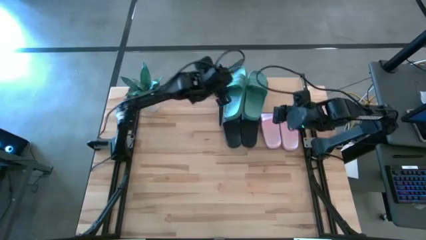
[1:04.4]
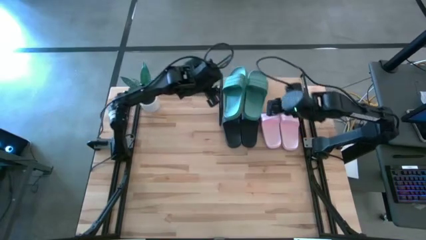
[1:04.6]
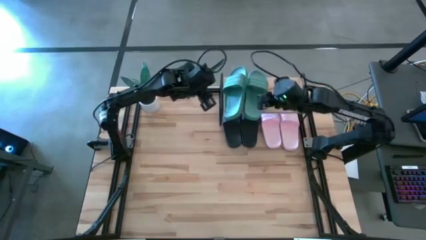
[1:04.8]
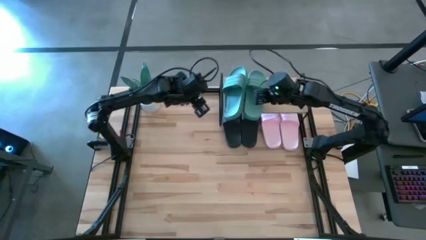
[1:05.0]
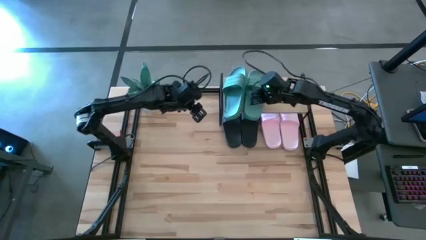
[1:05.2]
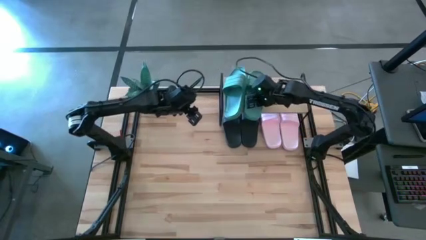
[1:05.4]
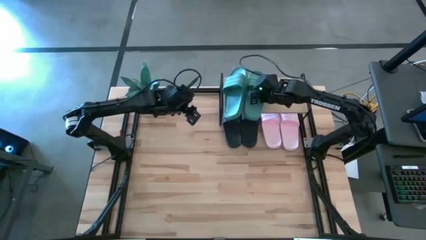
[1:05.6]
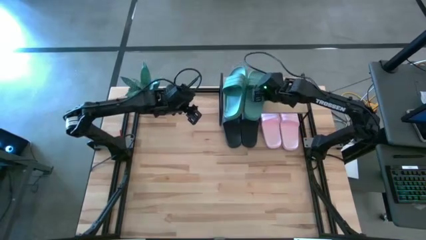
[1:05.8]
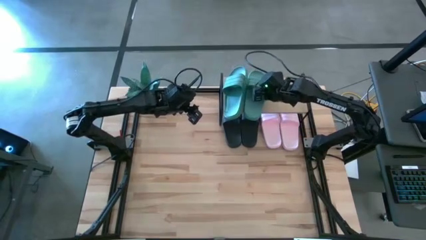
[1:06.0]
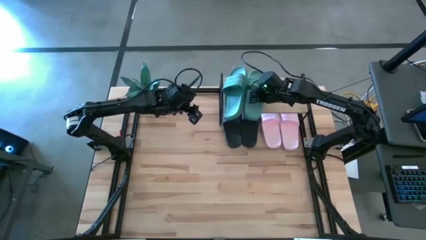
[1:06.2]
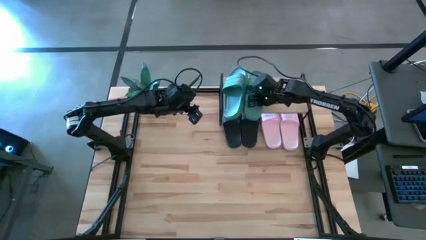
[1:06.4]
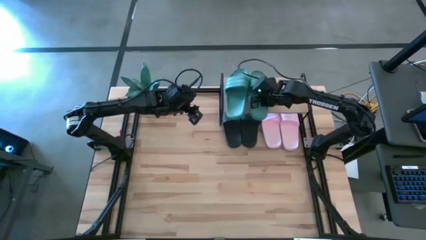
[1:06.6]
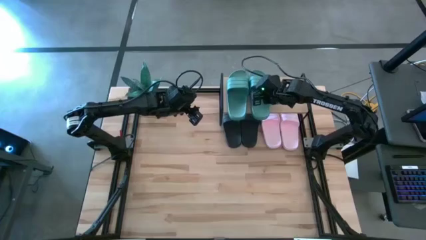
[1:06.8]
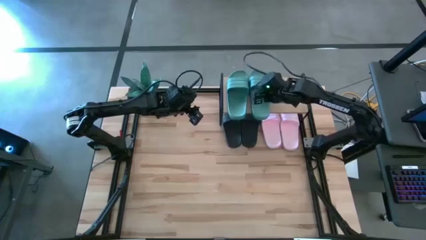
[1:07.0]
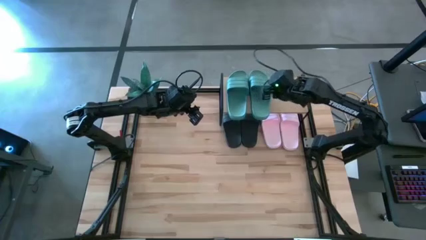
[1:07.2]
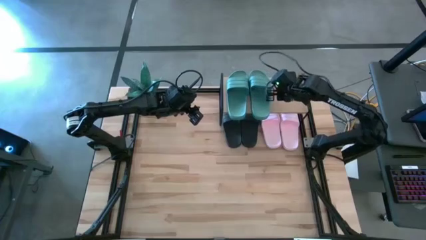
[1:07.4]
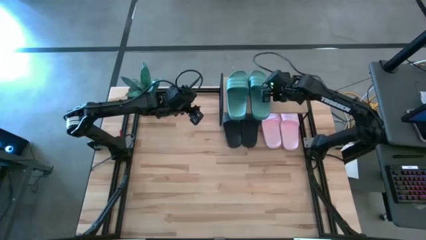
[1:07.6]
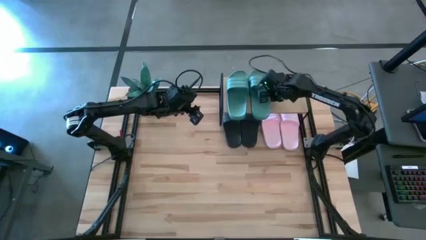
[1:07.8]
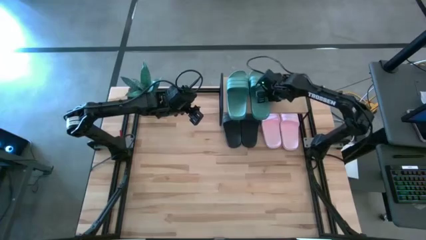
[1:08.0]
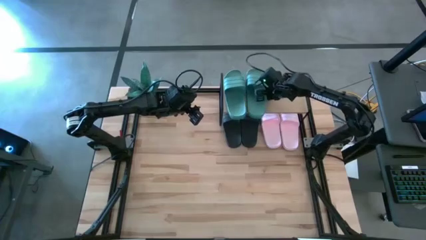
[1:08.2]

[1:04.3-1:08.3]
Task: Pick and place slides into the shelf
Adjust the right green slide on the shelf

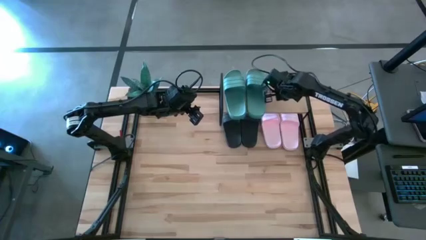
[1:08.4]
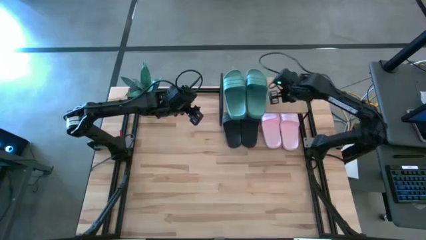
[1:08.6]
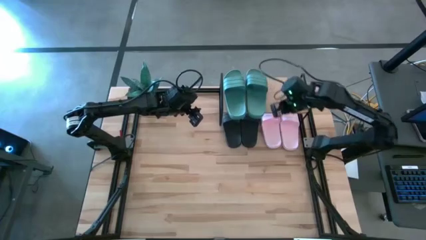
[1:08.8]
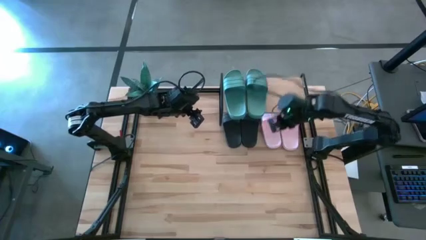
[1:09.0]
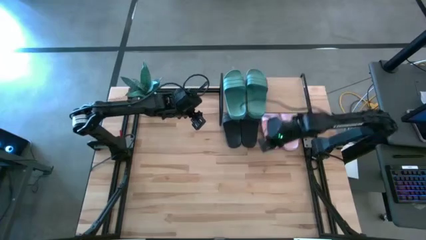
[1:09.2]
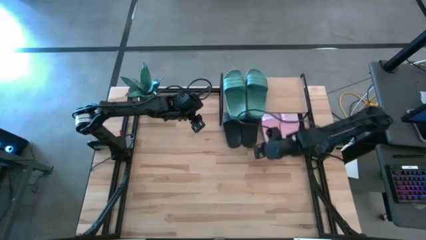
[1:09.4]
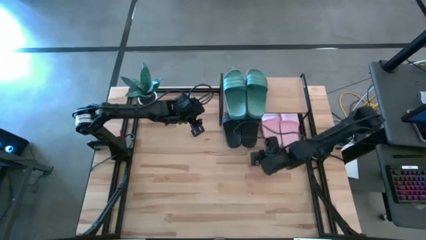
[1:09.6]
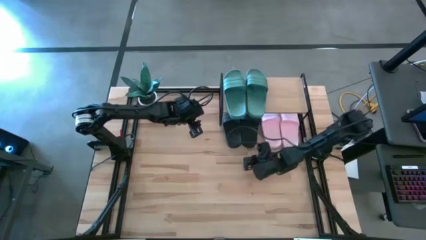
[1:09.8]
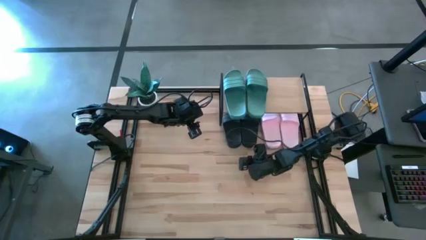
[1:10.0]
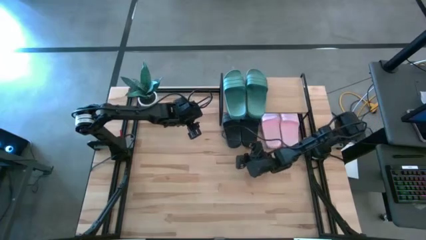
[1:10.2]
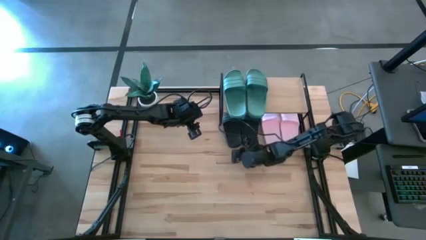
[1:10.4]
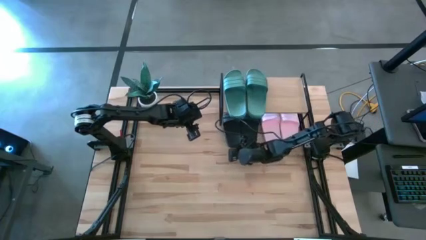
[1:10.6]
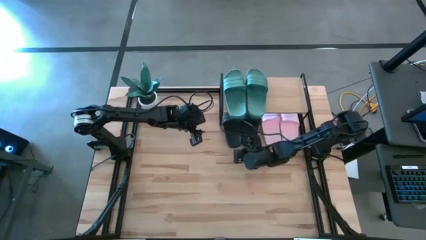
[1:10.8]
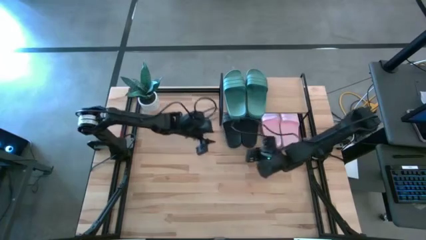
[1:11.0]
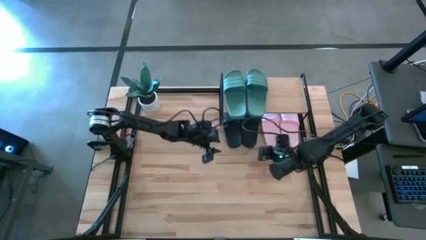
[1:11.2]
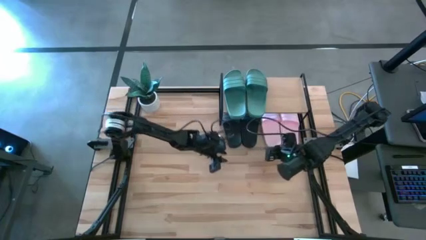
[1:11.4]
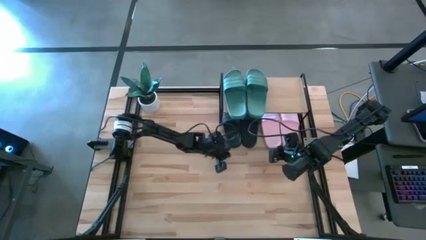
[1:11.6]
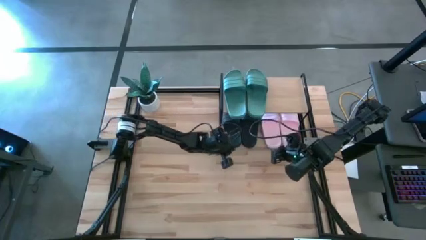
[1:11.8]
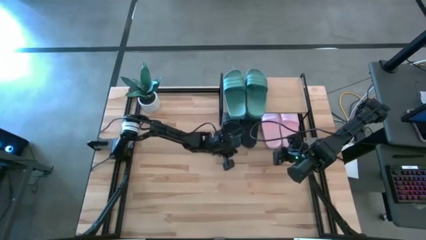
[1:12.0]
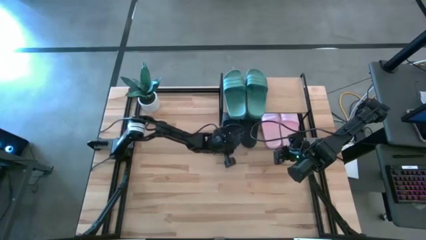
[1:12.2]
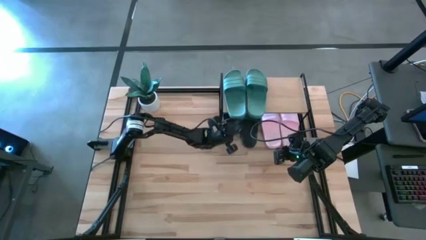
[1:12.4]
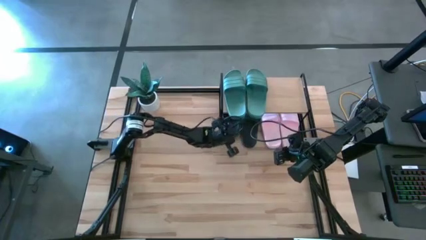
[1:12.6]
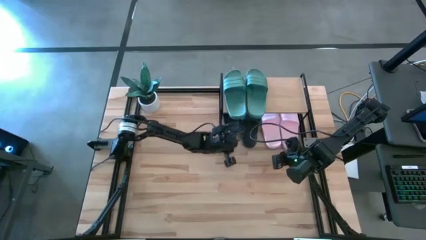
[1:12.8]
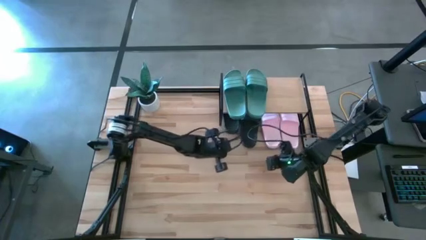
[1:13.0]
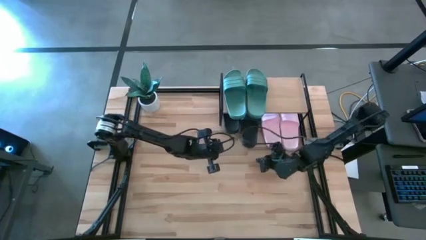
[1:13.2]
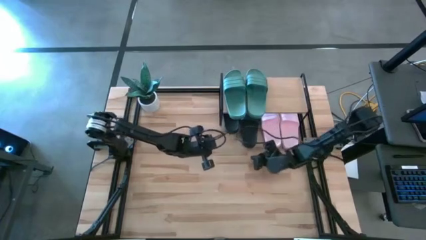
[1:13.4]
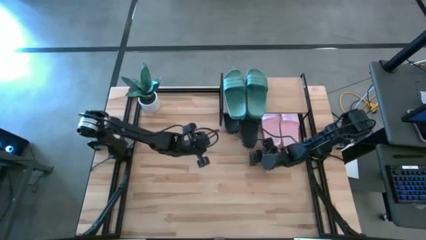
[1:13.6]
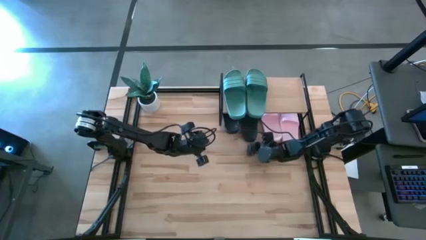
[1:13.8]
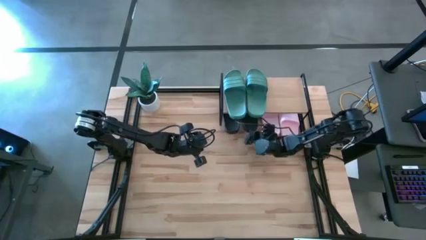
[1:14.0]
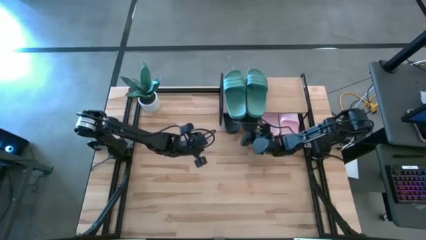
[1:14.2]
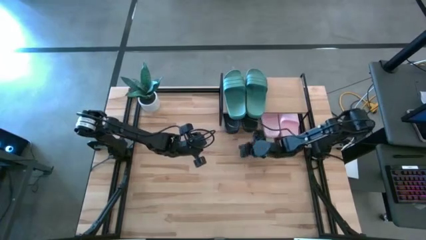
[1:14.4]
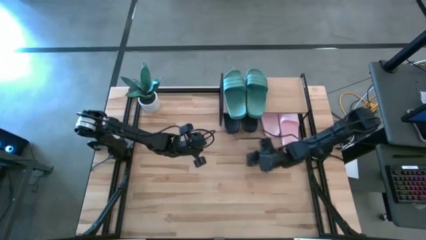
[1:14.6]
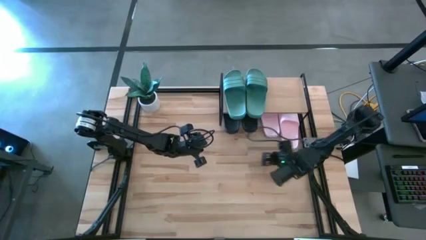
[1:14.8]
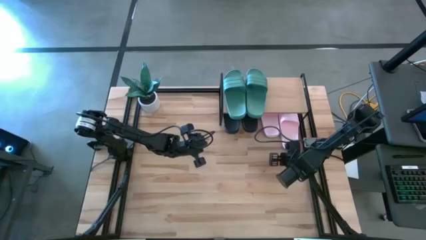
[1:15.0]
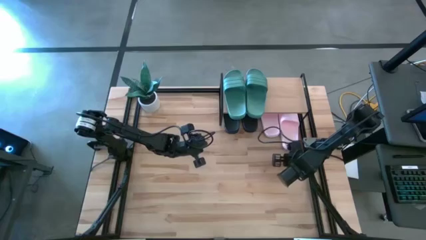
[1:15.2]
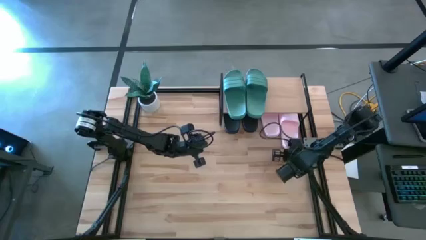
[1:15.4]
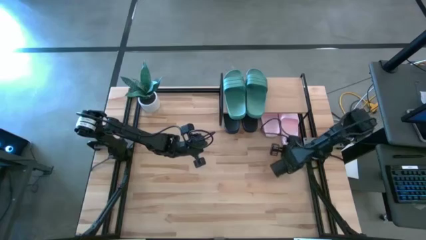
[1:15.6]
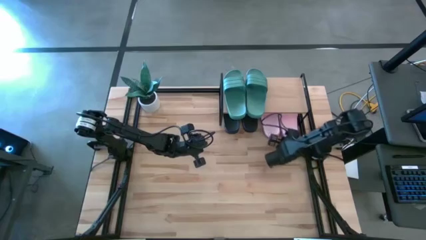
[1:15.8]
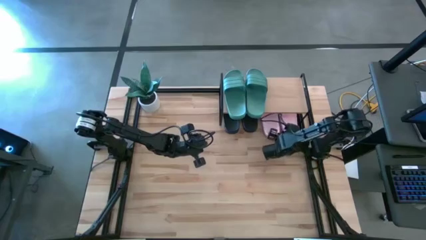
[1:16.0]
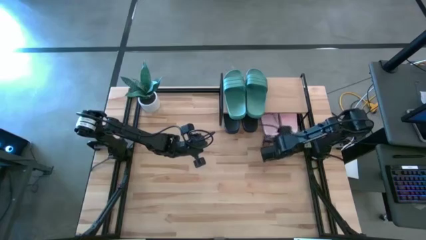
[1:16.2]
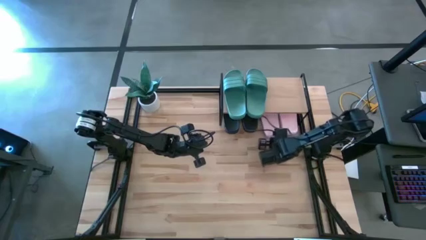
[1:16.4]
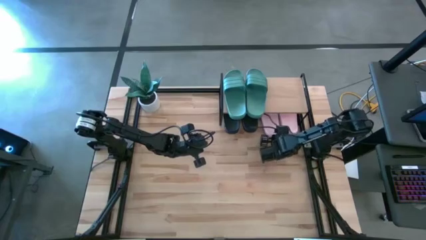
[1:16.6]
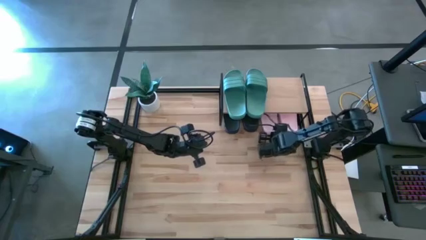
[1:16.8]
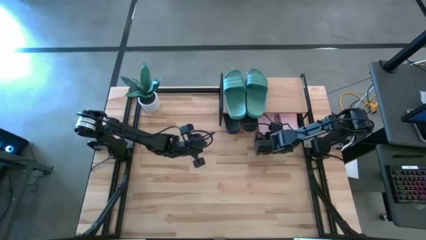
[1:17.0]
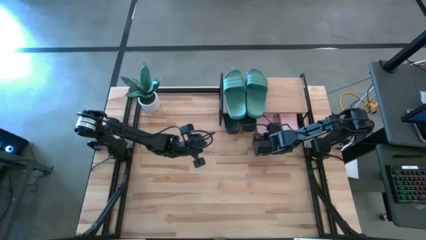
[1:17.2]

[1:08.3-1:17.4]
Adjust the slides under the shelf

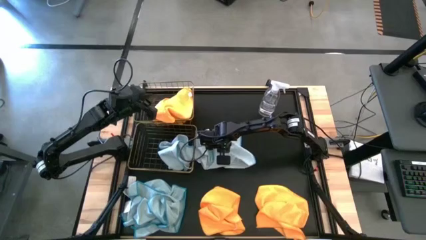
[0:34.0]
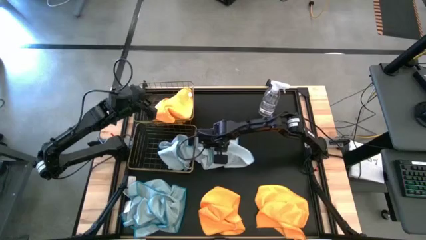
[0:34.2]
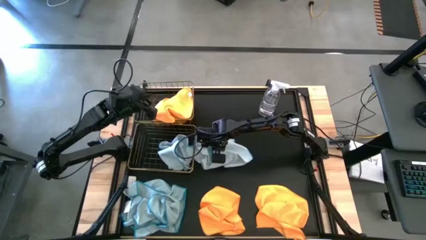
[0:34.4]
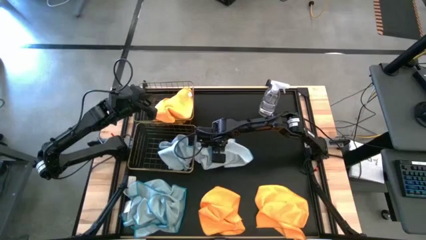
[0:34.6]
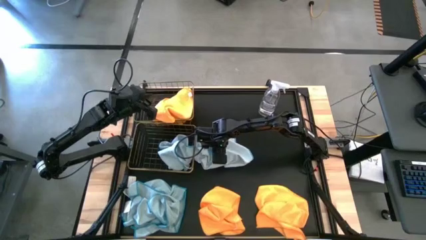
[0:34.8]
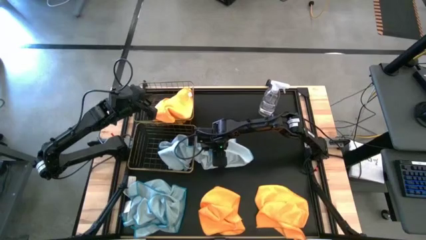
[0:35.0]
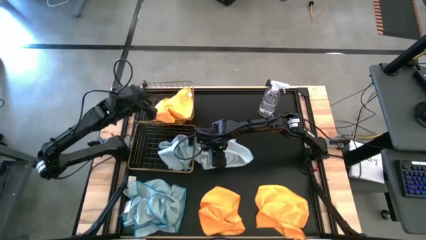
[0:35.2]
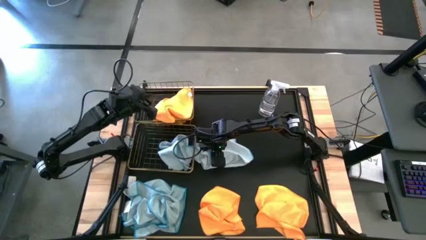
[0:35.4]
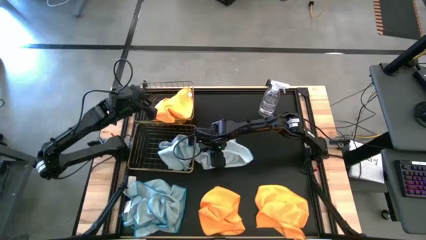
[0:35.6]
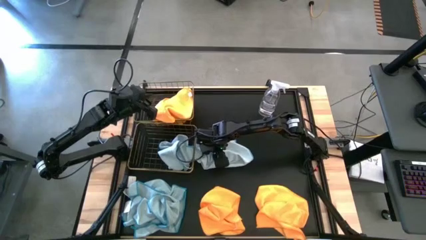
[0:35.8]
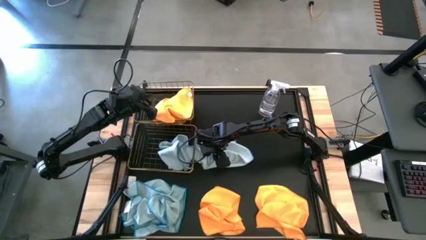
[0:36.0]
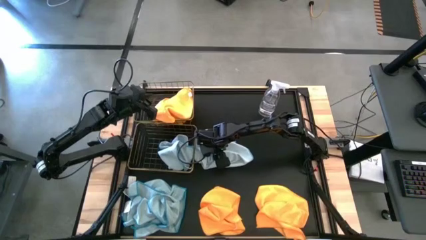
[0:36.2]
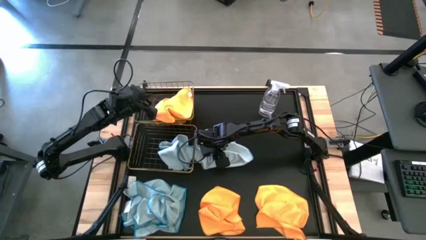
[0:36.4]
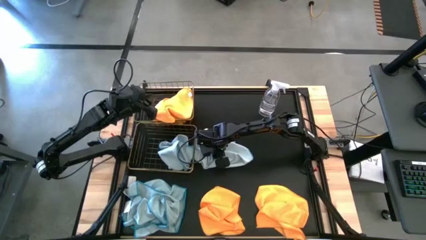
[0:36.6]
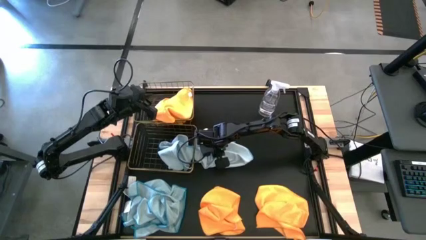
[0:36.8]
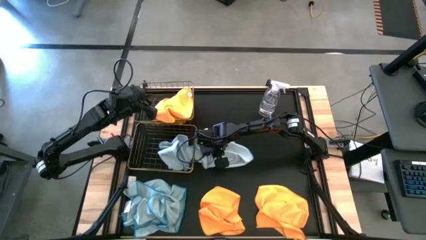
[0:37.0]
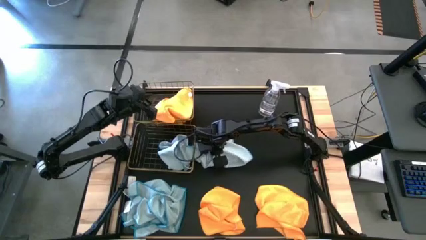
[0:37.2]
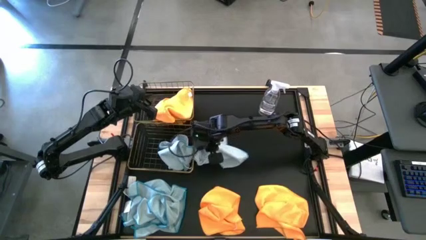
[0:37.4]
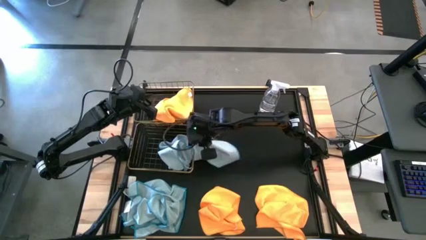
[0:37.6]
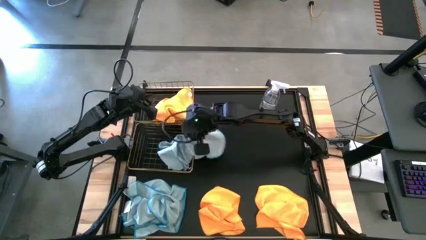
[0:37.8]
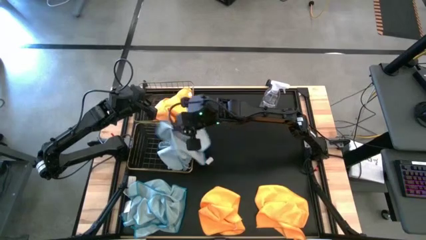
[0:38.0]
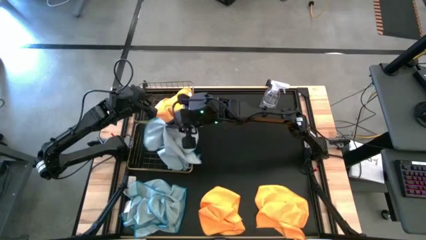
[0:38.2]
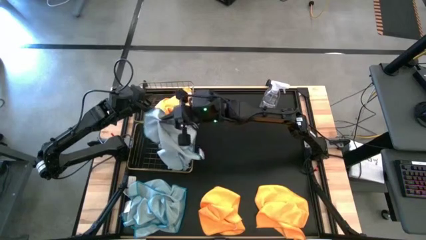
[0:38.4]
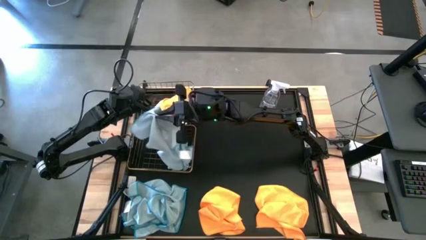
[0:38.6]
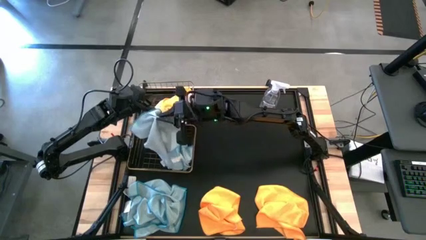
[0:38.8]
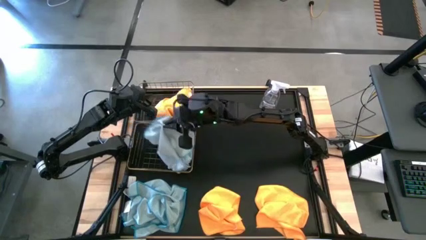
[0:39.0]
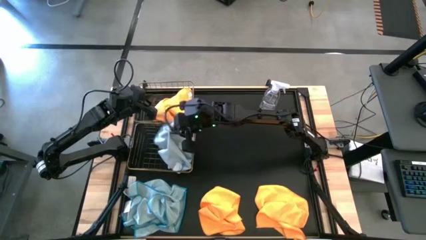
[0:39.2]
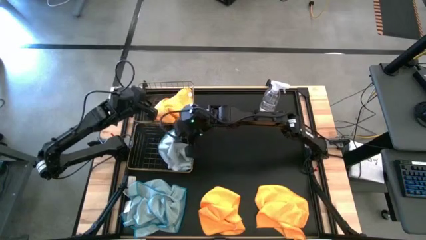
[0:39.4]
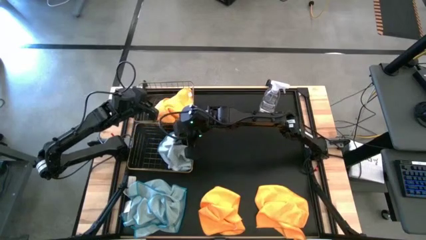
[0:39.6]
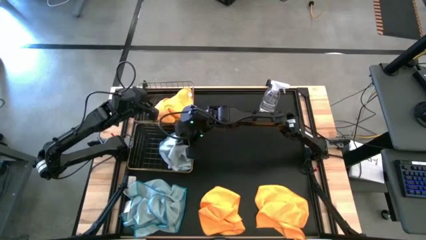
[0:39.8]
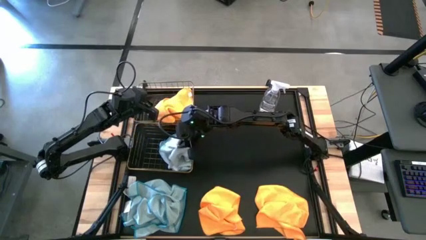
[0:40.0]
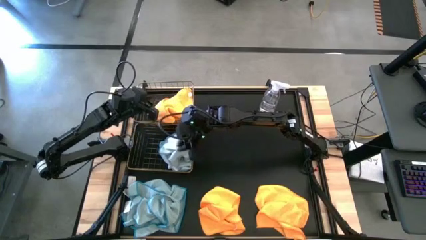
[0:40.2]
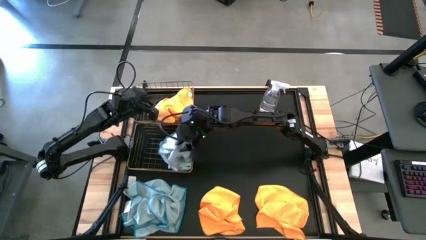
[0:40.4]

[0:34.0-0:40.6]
Task: Sort microfiber towel by color & place in baskets
Put the blue towel into the bottom wire basket
